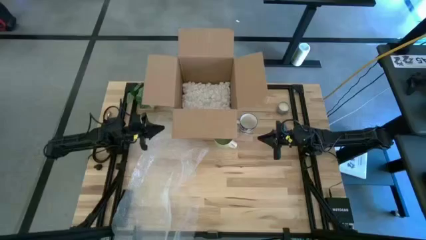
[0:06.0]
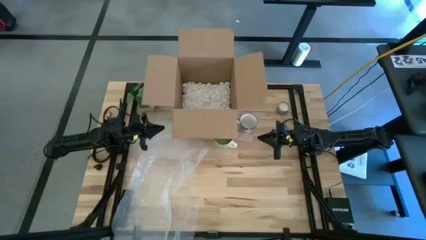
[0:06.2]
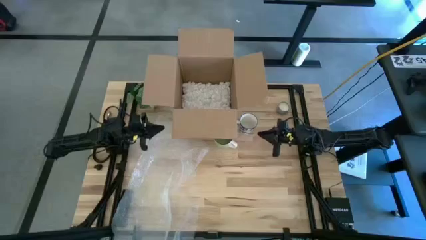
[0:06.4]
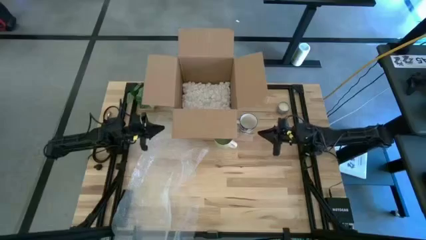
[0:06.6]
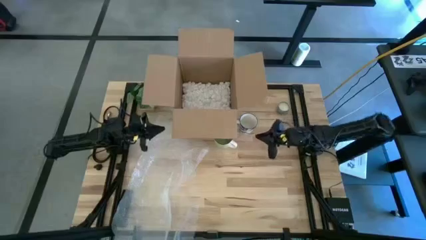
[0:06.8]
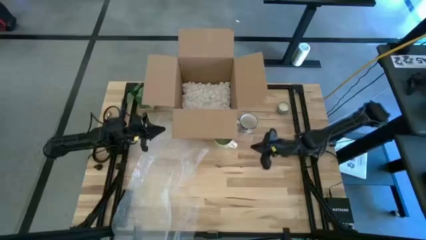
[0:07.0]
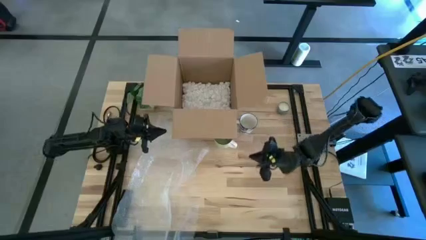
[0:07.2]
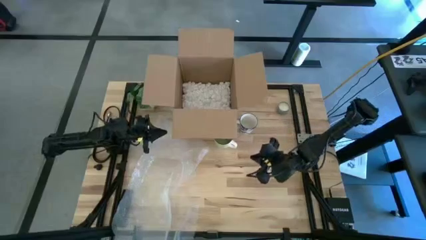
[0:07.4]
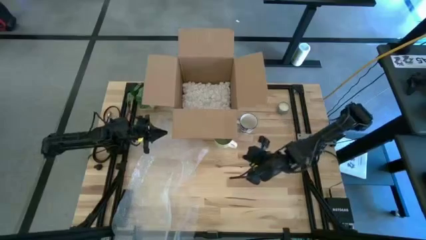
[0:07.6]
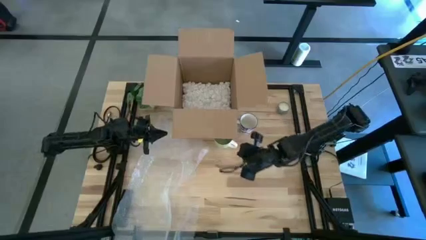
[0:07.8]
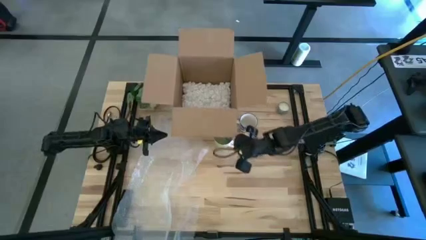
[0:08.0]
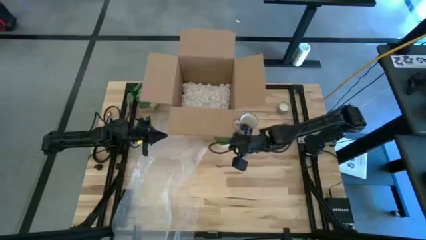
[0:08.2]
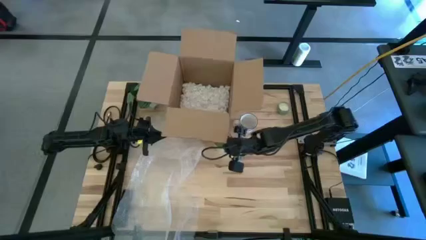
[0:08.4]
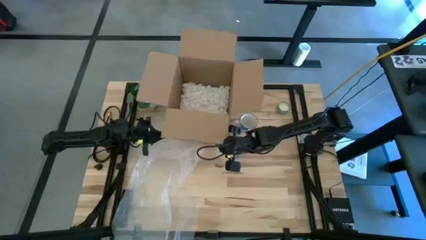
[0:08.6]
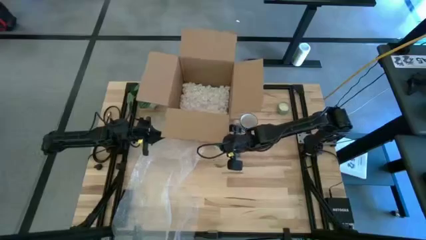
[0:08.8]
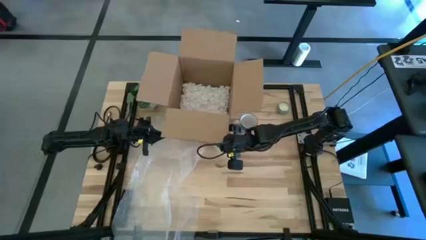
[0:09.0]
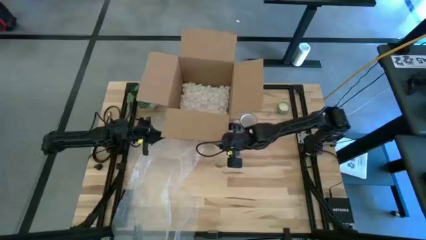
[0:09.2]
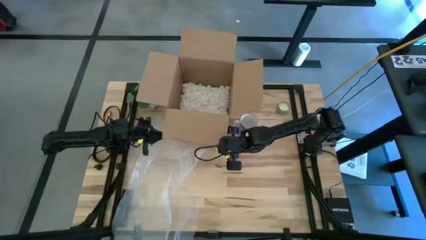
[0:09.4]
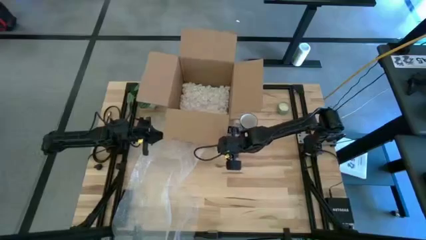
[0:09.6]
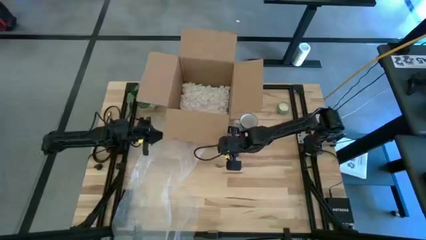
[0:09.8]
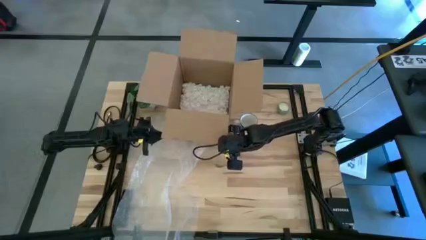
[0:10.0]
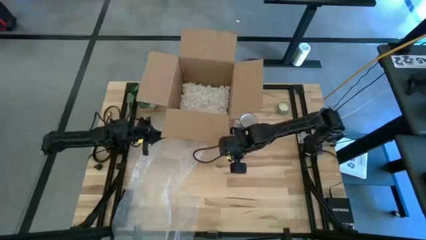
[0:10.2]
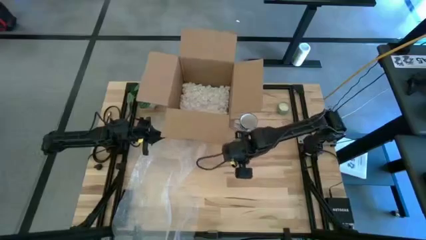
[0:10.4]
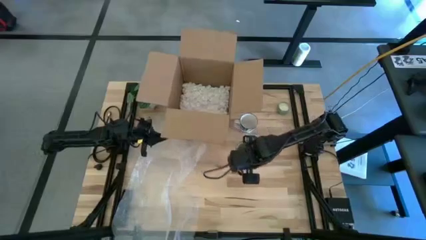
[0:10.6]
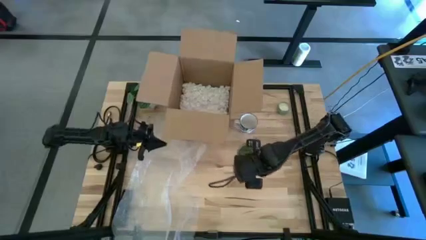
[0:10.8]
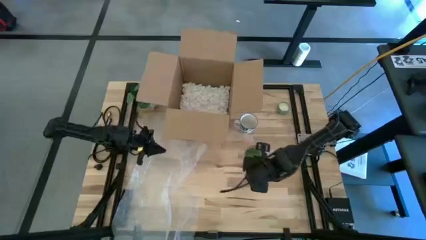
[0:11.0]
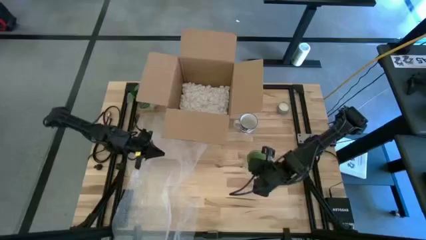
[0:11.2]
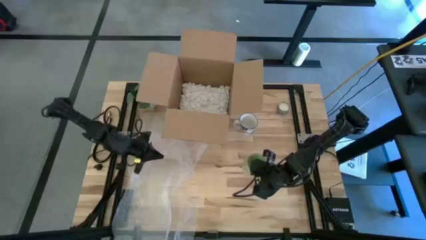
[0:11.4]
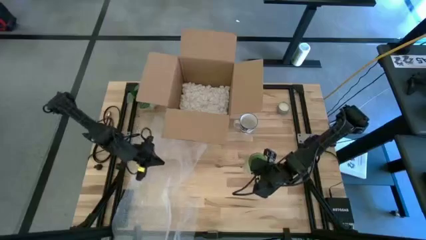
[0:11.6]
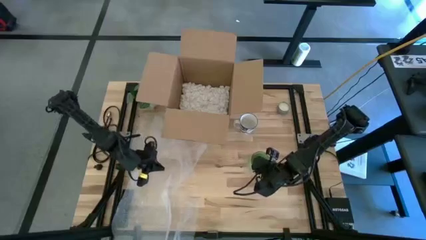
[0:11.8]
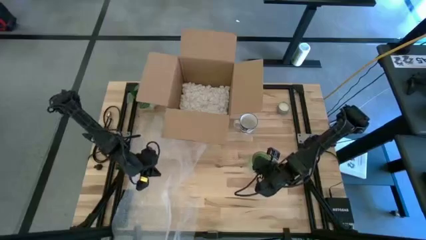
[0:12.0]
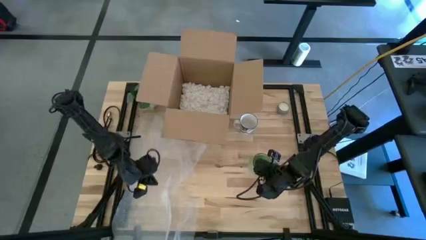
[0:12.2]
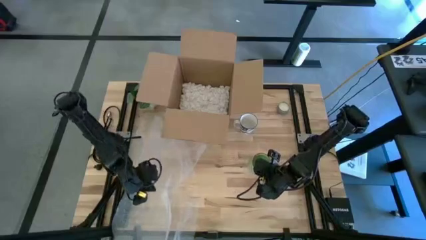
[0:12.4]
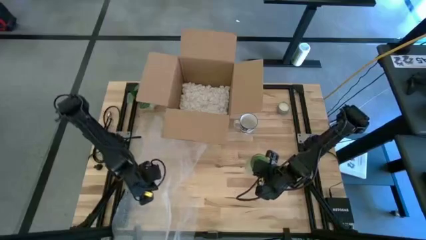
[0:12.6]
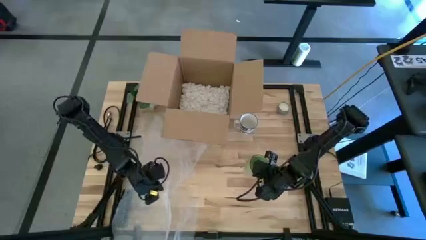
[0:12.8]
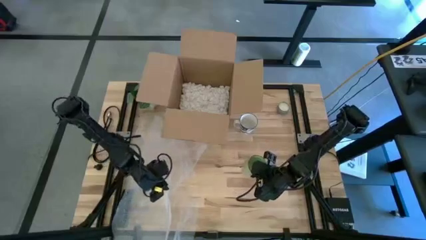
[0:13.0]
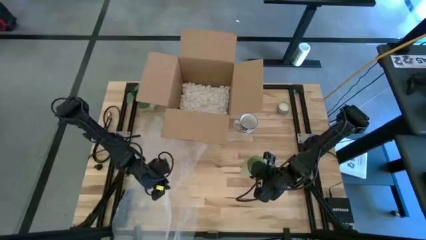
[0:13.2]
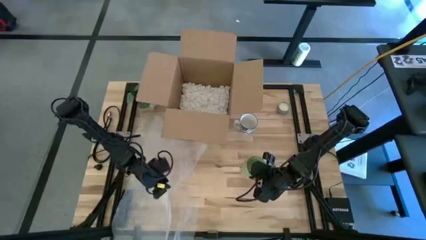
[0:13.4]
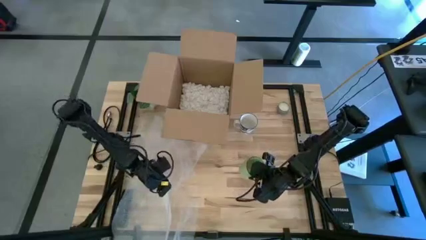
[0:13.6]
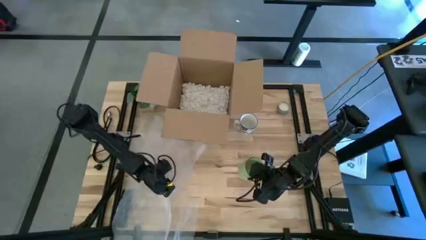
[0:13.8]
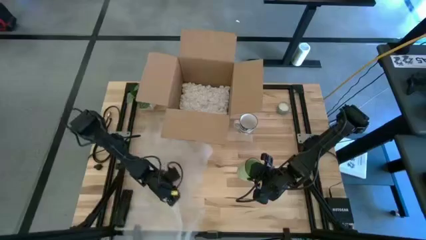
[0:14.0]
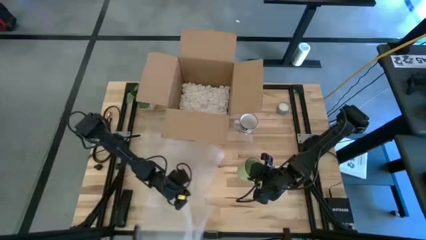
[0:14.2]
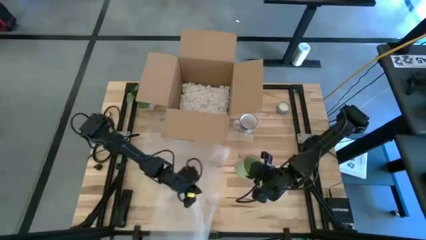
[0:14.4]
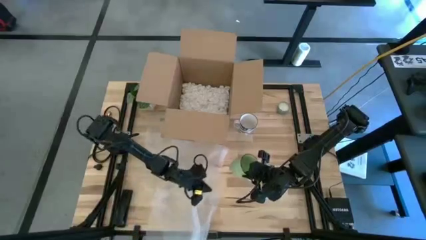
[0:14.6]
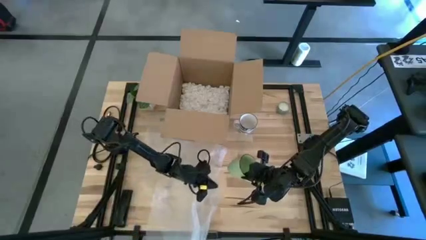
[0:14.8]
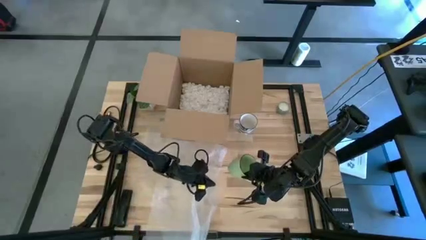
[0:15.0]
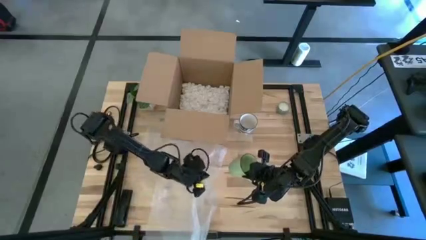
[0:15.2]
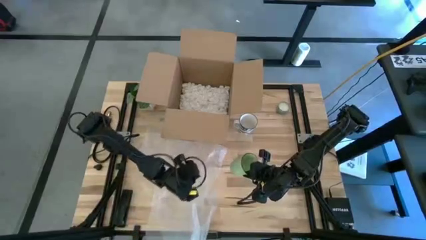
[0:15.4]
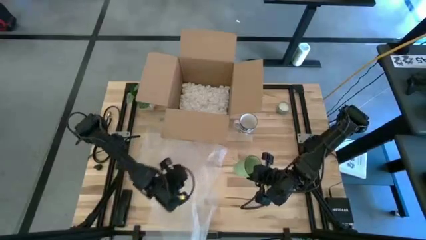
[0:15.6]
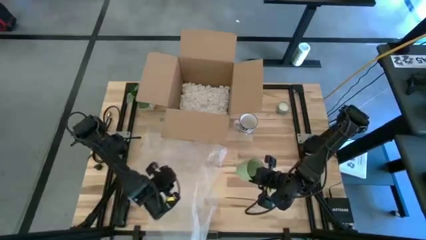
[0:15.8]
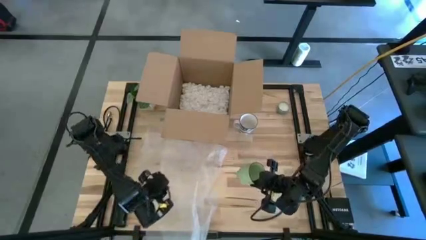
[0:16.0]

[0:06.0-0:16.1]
Task: wrap mug
Wrap the green mug with the bubble wrap
